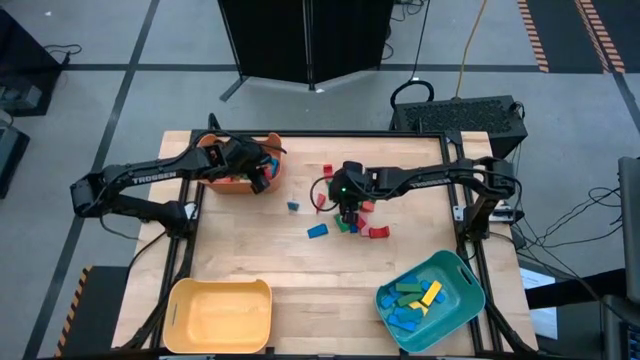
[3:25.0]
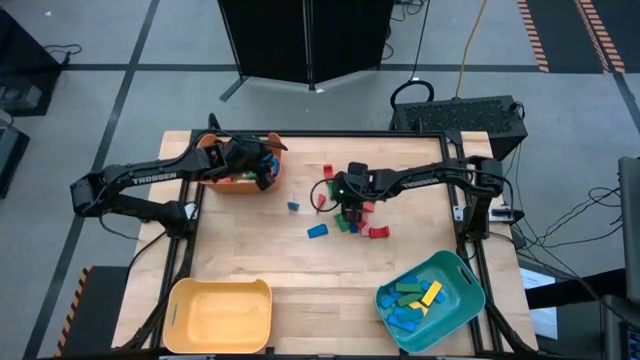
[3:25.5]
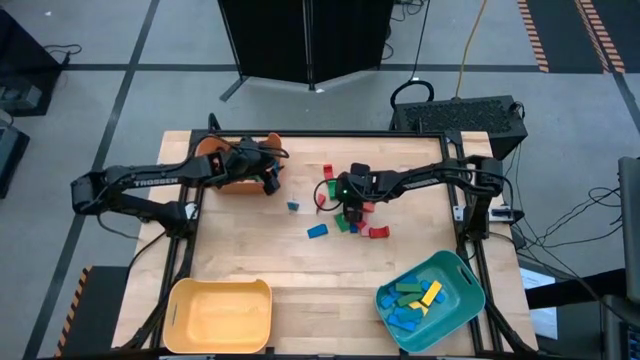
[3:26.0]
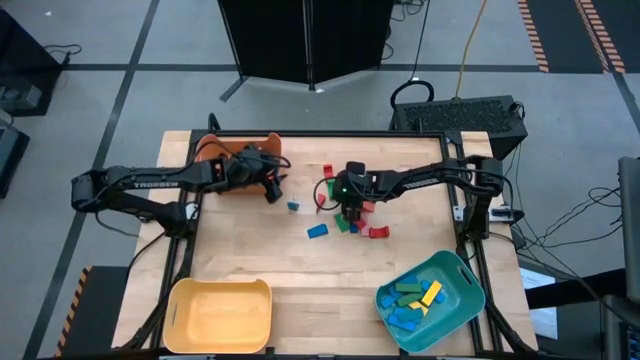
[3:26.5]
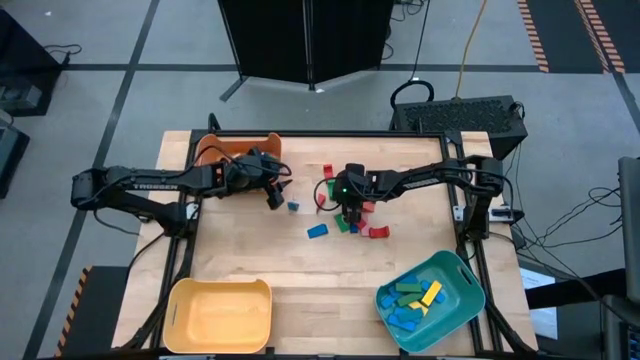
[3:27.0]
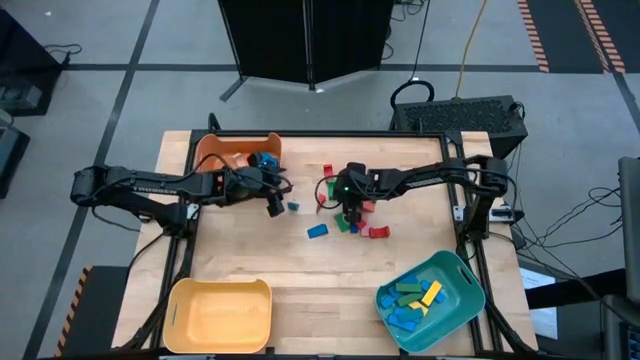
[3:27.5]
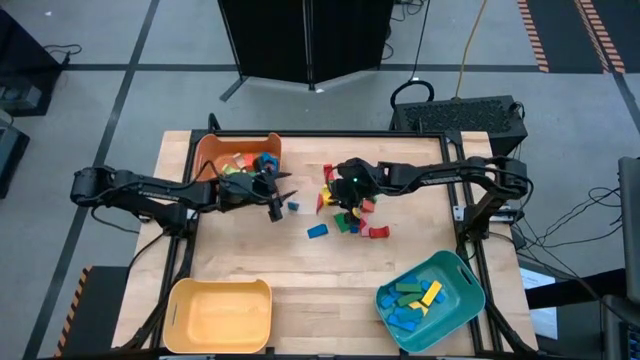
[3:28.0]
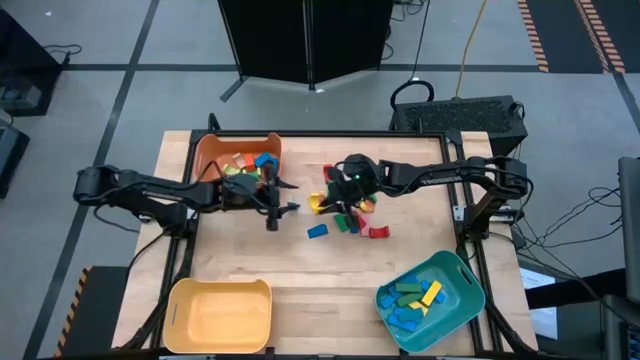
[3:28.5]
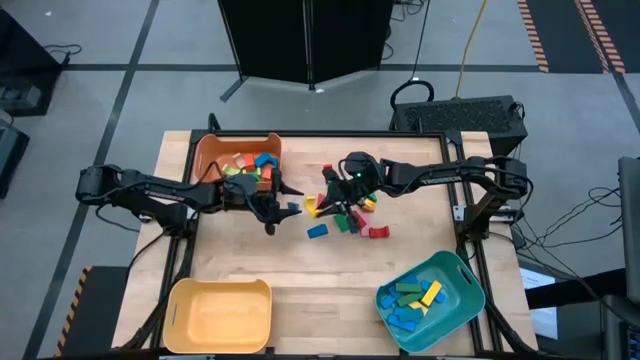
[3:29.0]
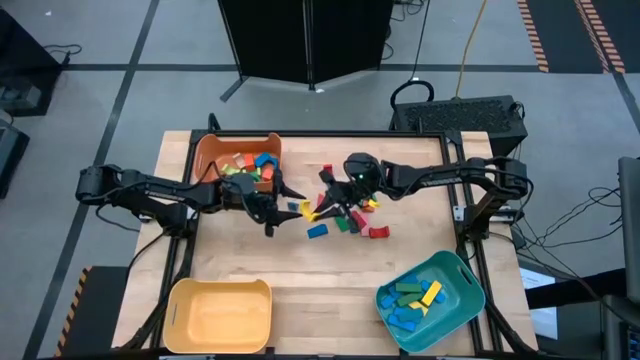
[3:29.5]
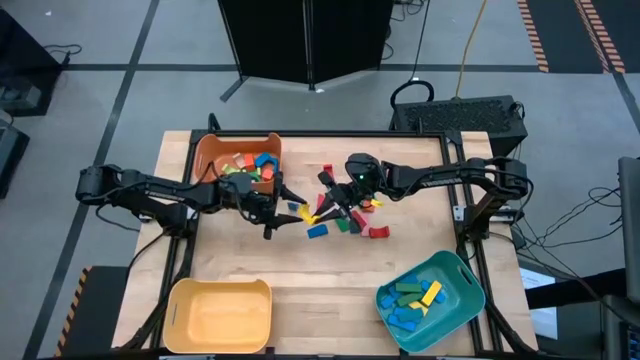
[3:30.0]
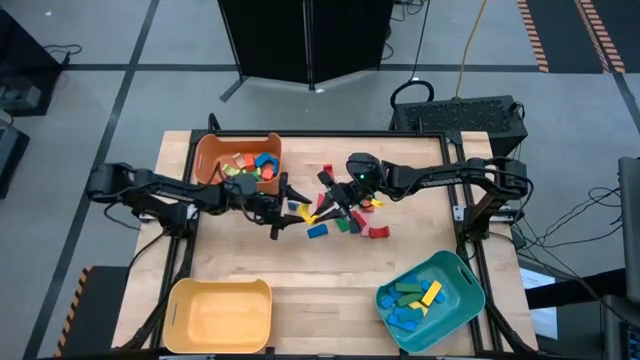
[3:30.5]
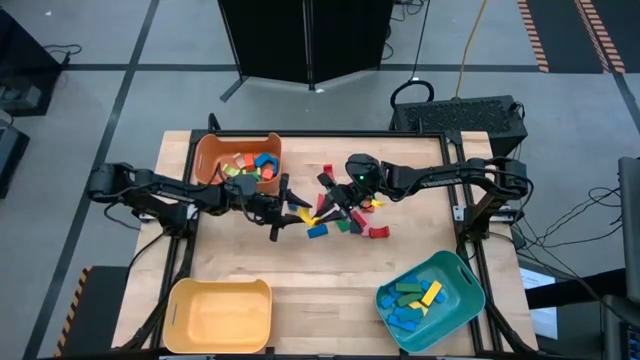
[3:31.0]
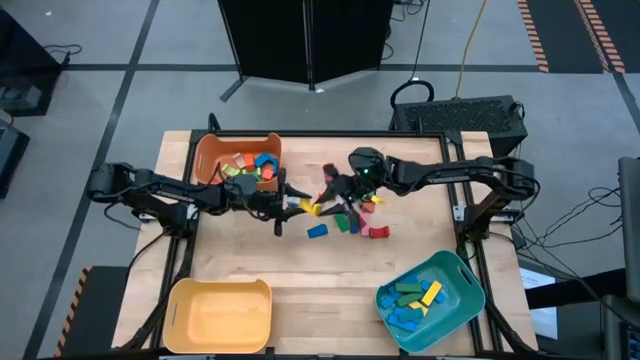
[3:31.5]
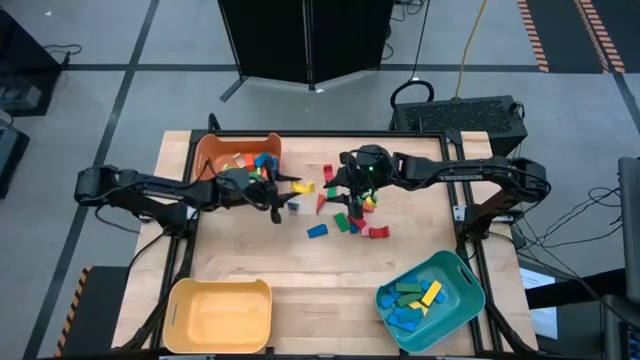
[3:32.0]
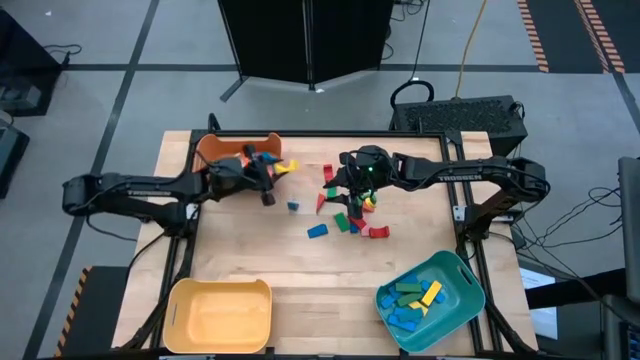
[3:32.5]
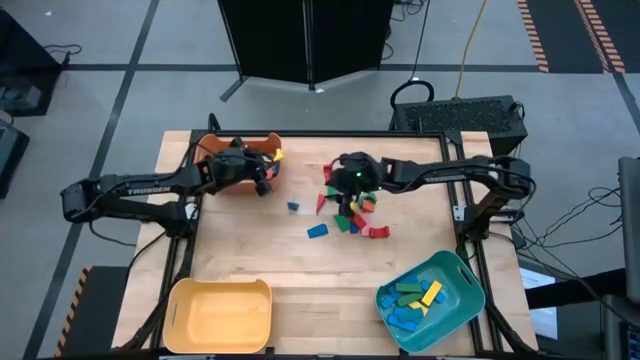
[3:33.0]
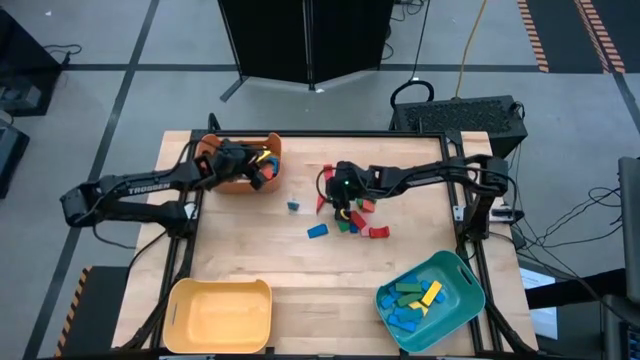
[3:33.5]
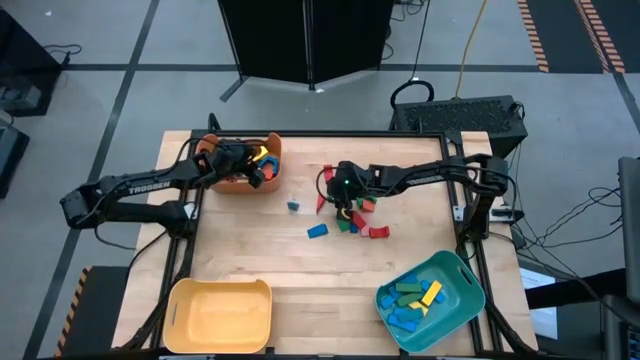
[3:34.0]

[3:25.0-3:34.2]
Task: Sort blocks by size
Put the yellow arch block into the orange bin

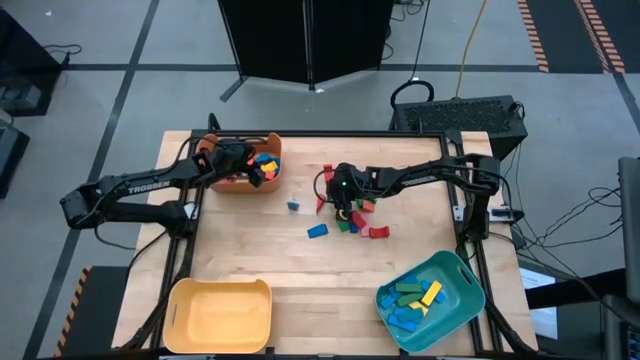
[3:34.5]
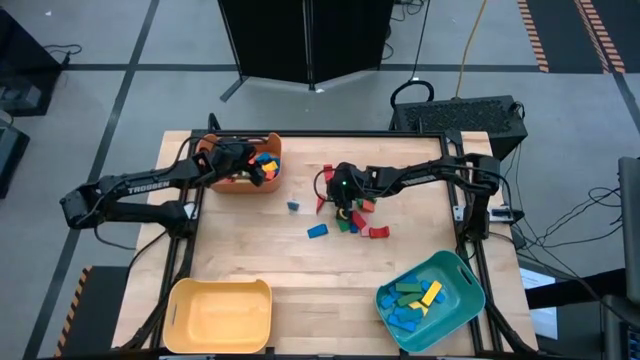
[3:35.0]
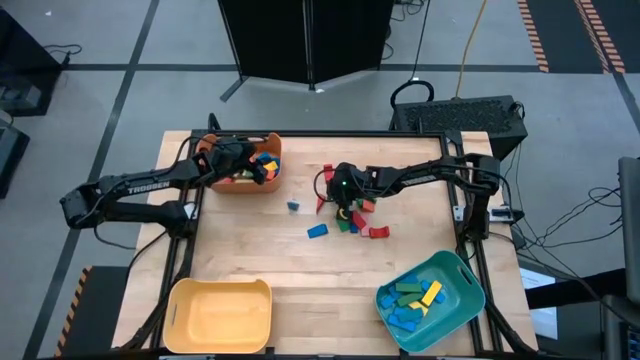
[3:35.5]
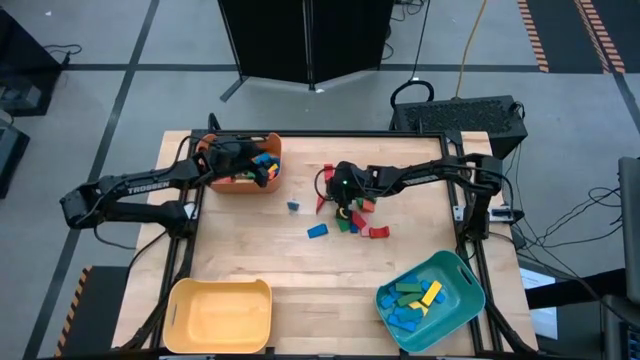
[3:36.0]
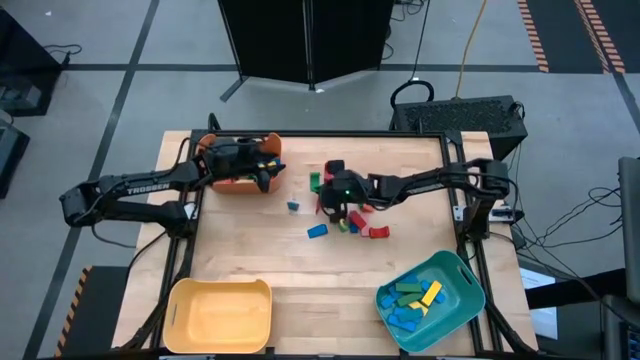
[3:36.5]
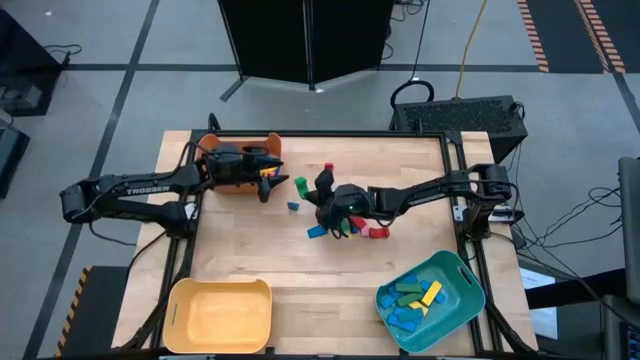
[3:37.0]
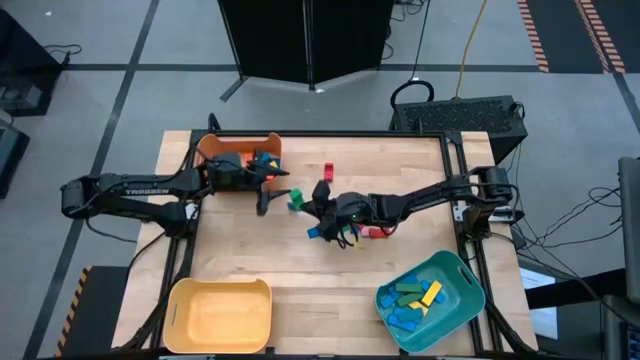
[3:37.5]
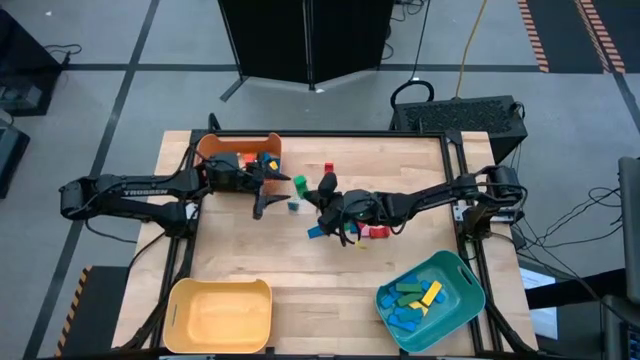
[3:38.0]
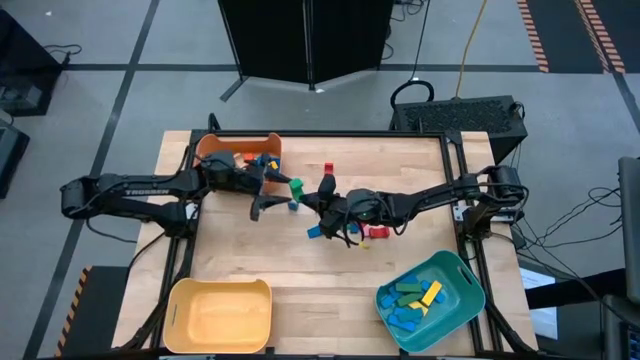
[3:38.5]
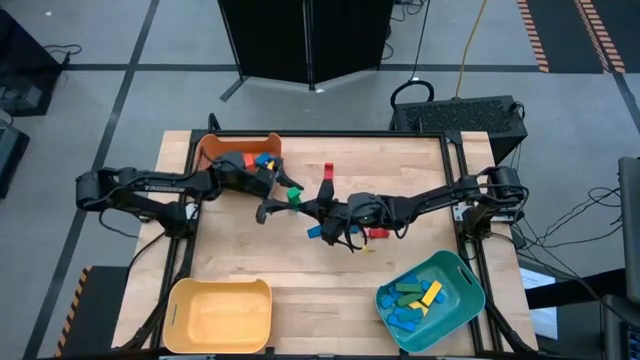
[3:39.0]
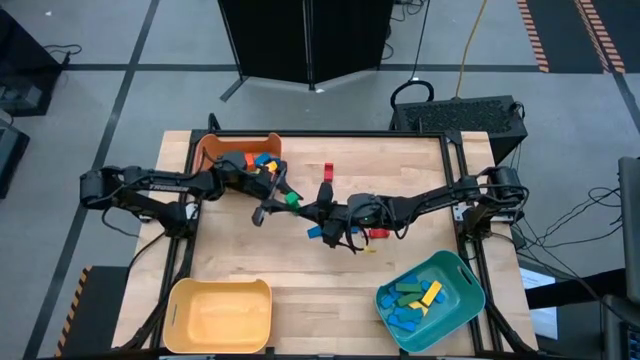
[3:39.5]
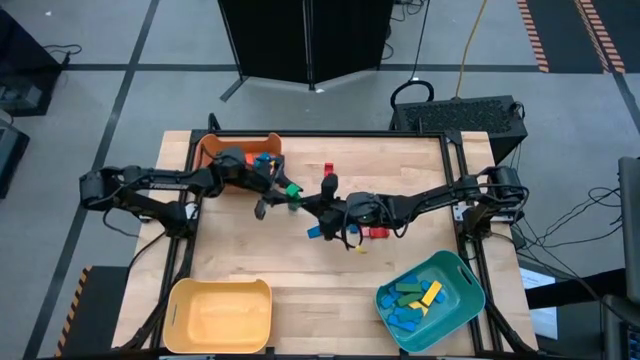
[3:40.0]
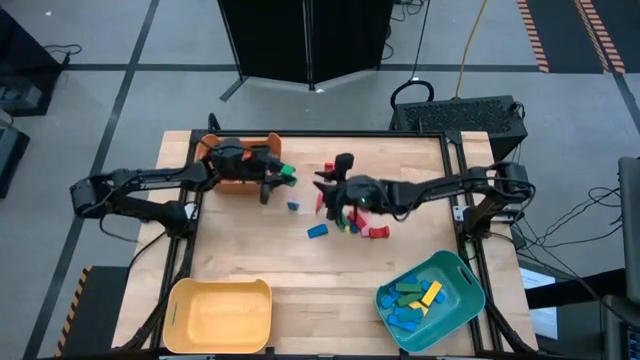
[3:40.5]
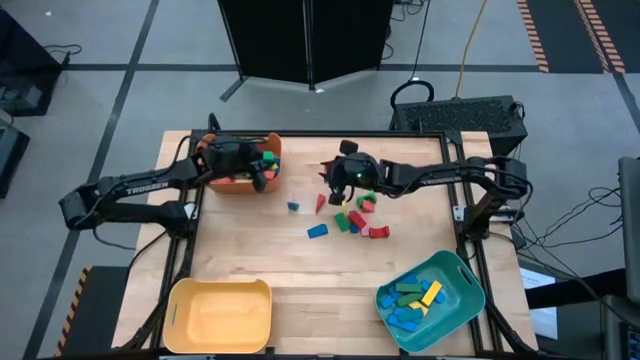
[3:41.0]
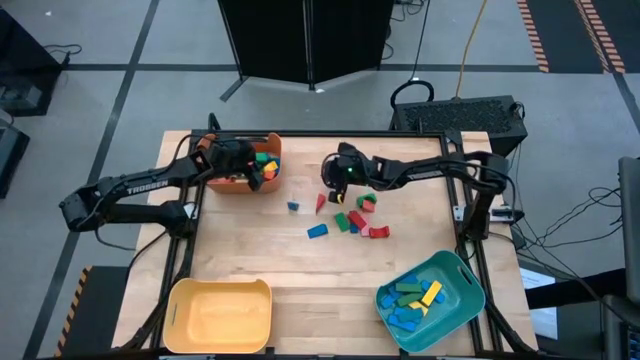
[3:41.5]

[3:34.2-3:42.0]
Put the green arch block into the orange bin

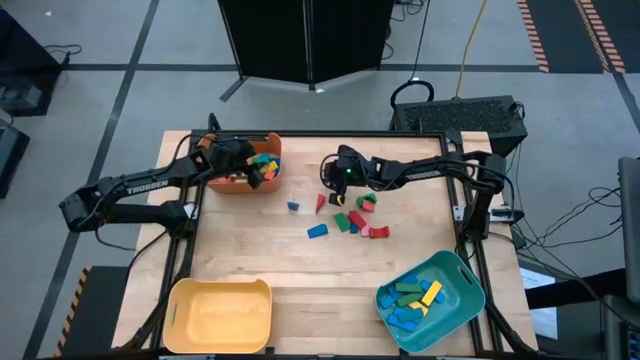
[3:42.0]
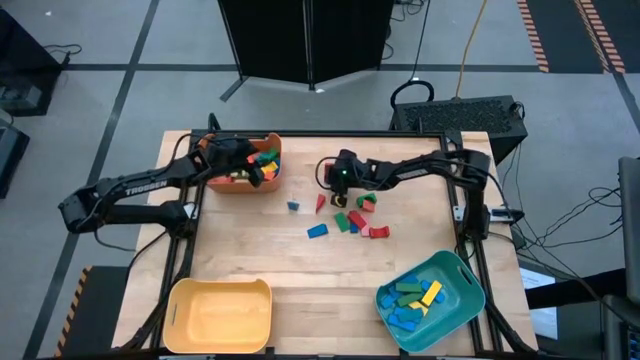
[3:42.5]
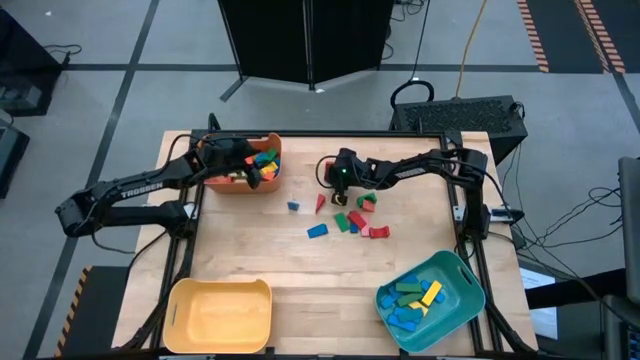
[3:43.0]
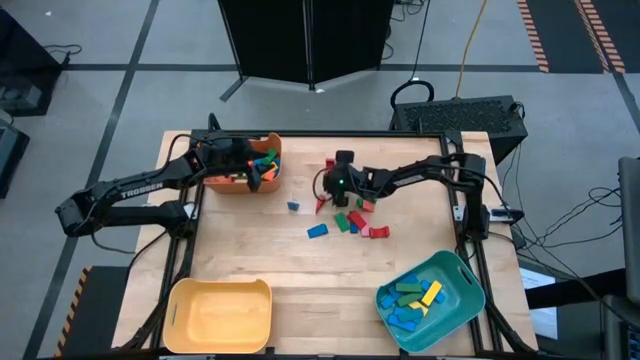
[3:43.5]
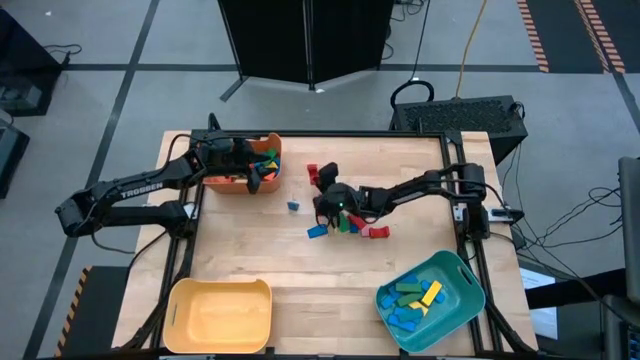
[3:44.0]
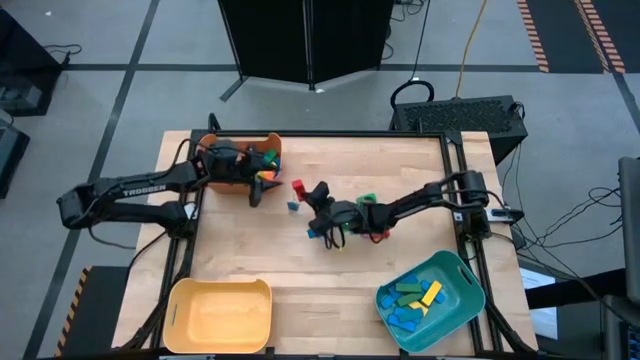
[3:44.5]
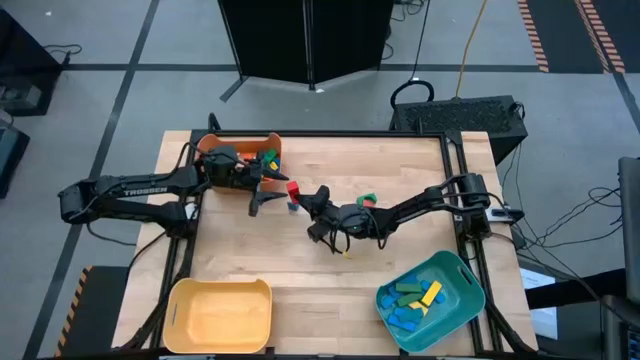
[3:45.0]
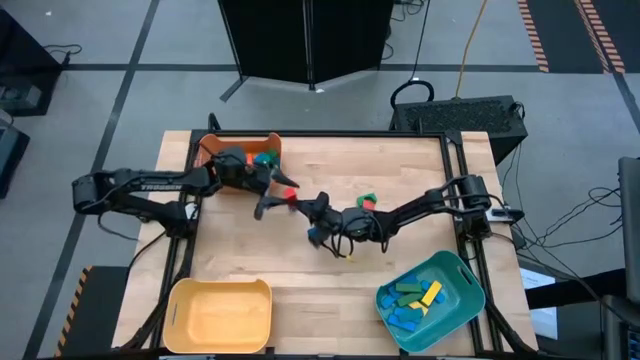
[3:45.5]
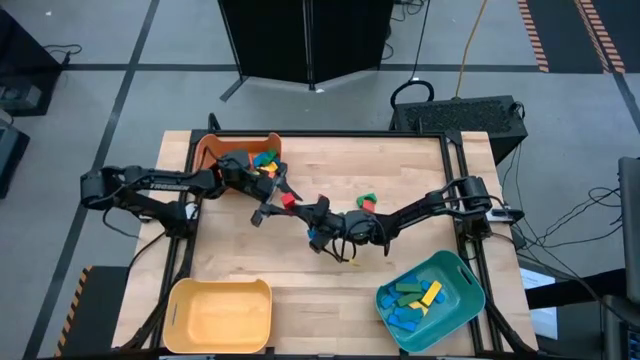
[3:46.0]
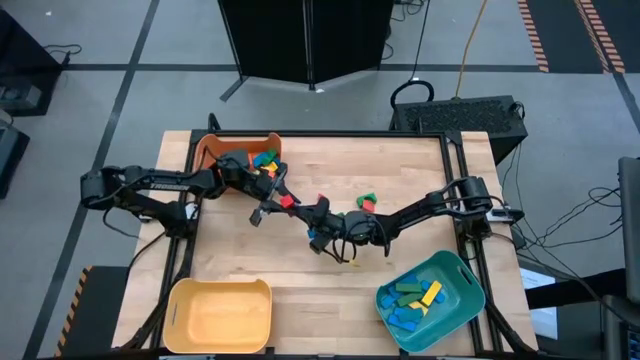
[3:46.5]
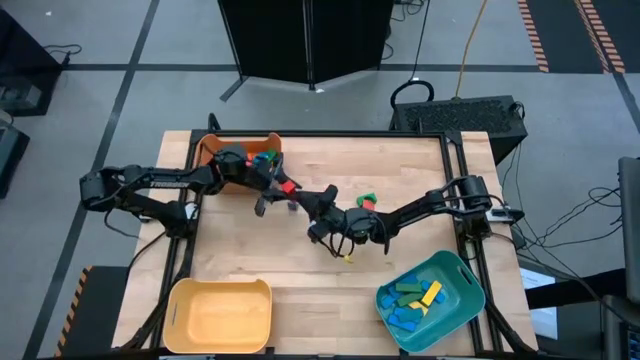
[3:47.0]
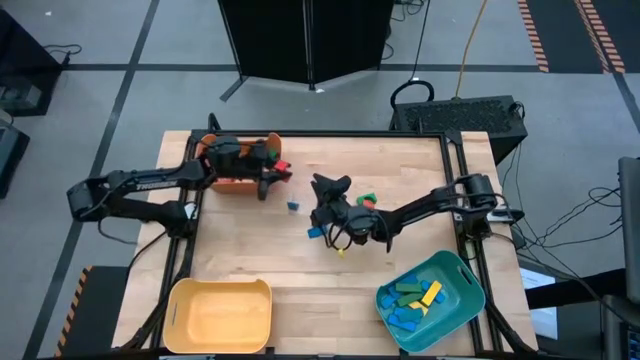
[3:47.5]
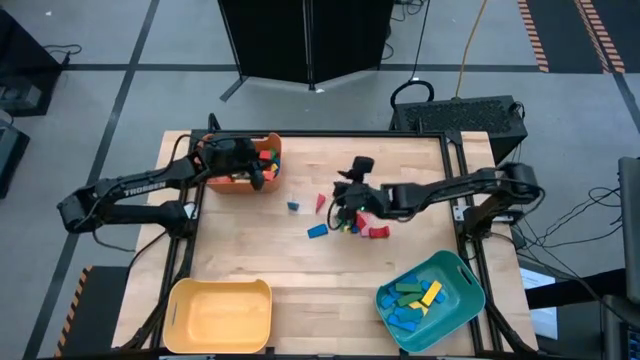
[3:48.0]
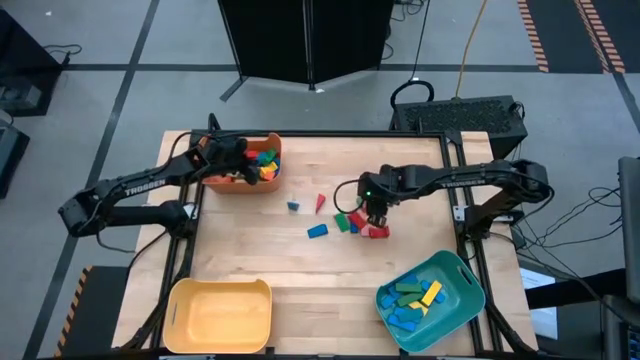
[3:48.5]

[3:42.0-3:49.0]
Put the red arch block into the orange bin
